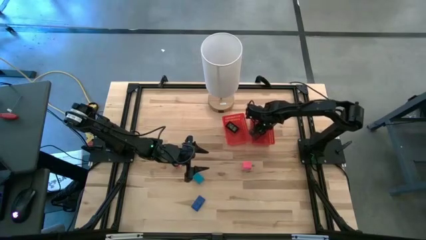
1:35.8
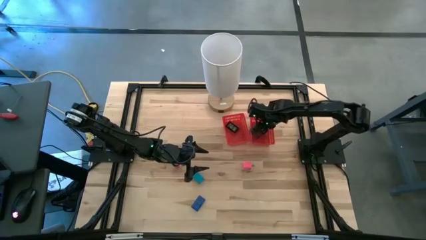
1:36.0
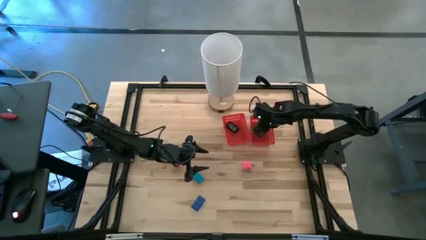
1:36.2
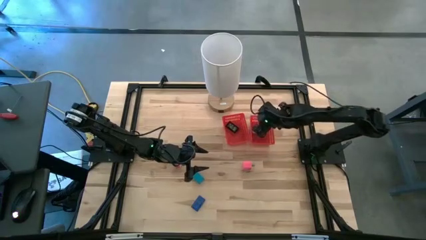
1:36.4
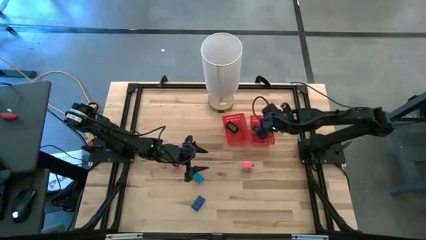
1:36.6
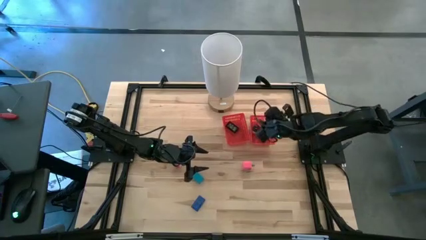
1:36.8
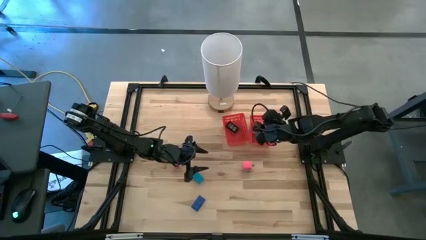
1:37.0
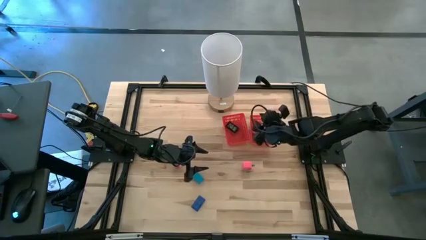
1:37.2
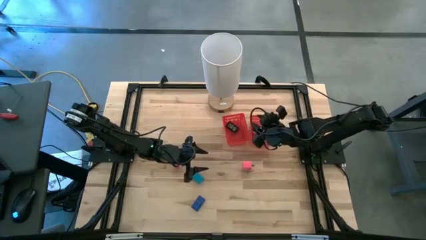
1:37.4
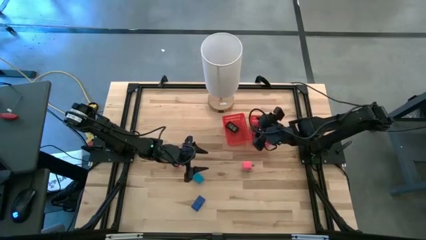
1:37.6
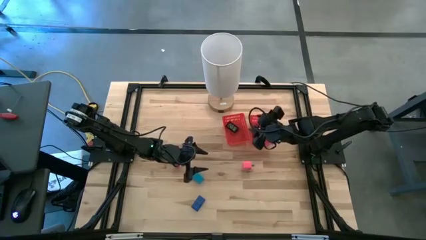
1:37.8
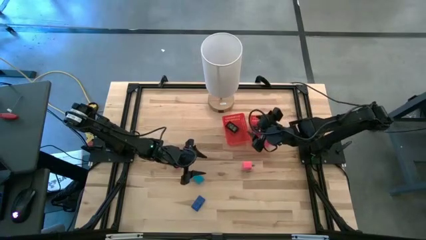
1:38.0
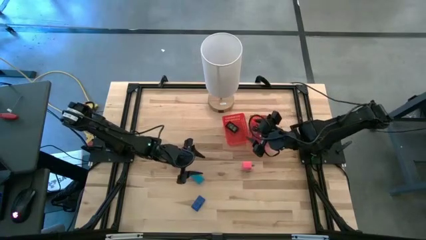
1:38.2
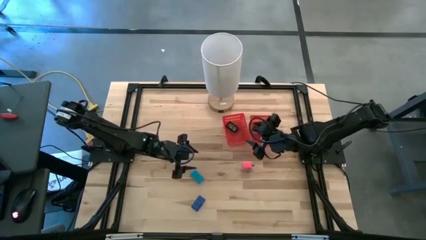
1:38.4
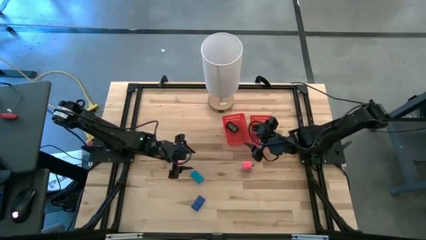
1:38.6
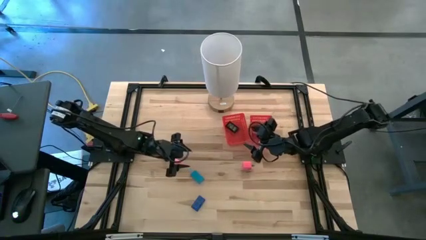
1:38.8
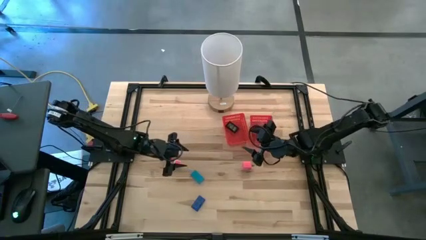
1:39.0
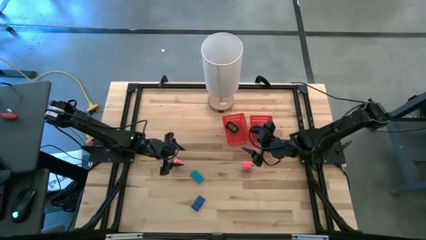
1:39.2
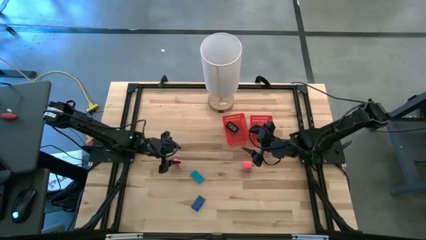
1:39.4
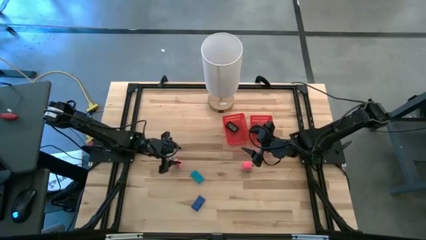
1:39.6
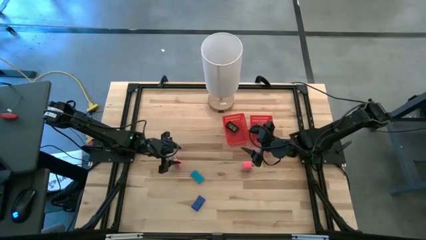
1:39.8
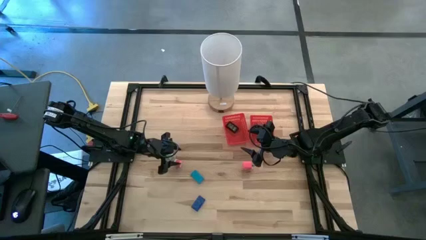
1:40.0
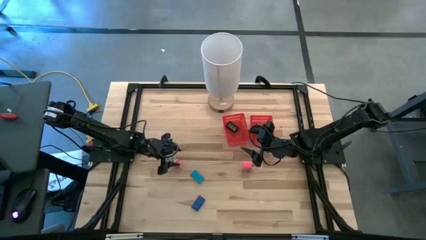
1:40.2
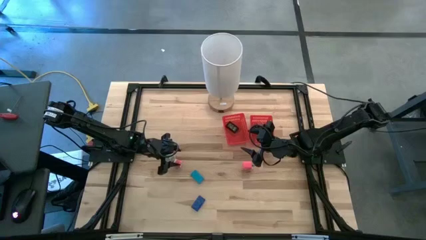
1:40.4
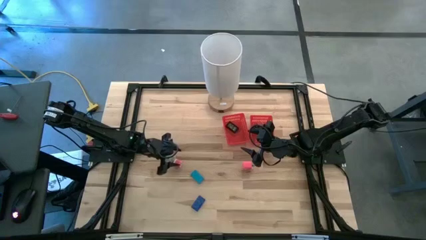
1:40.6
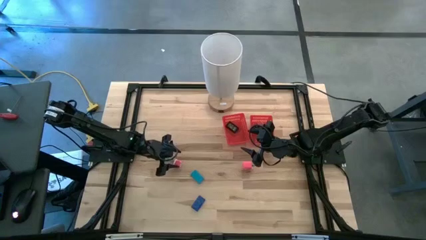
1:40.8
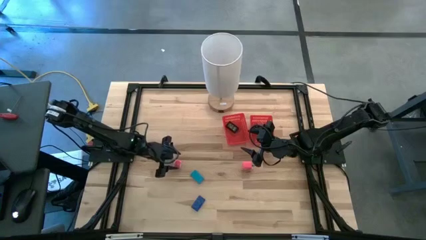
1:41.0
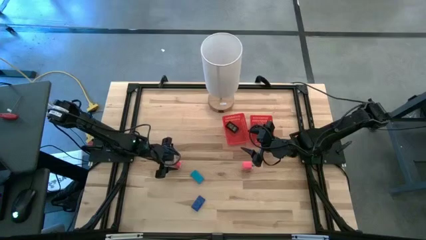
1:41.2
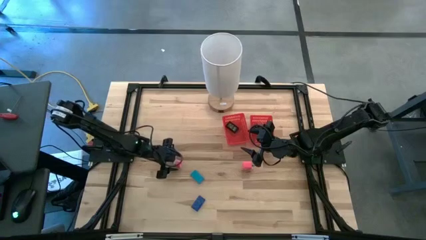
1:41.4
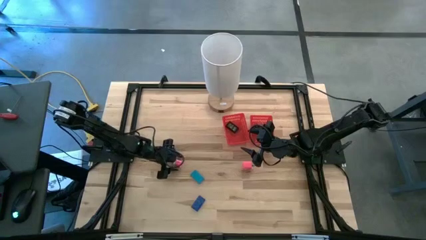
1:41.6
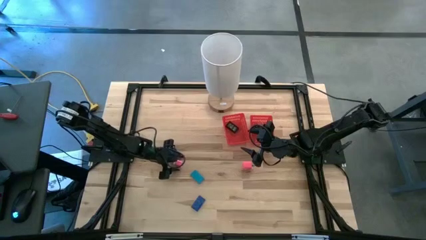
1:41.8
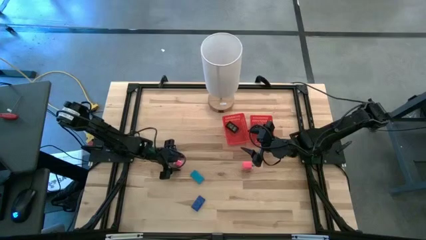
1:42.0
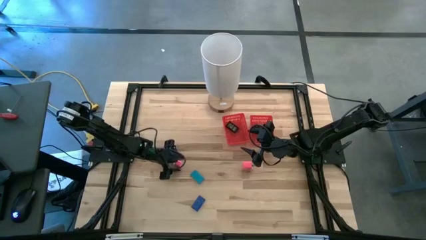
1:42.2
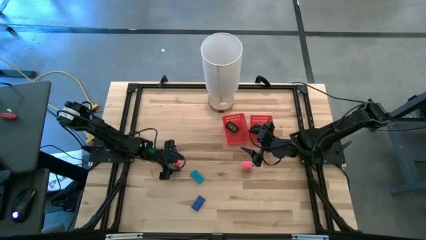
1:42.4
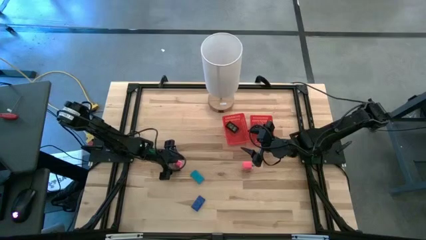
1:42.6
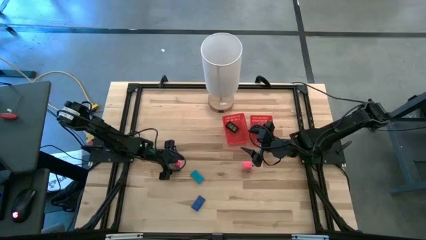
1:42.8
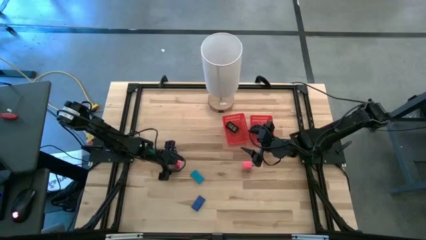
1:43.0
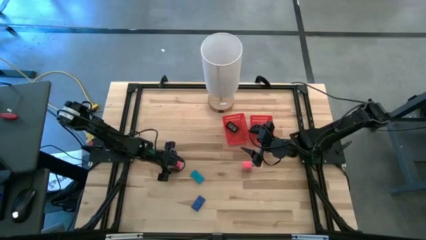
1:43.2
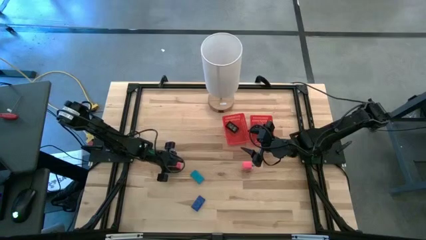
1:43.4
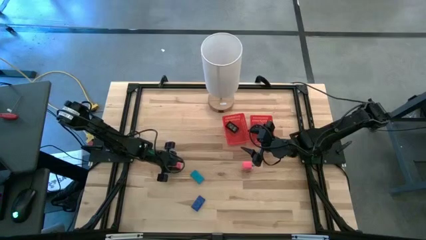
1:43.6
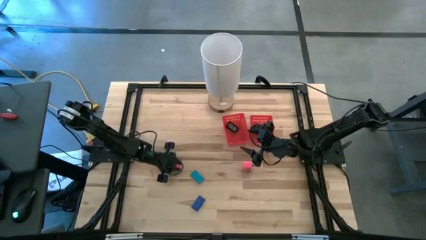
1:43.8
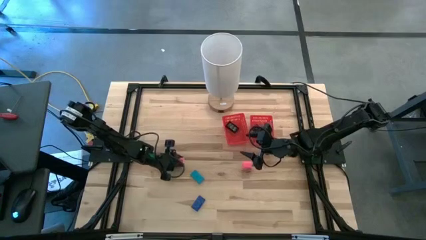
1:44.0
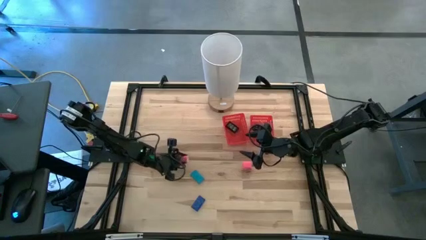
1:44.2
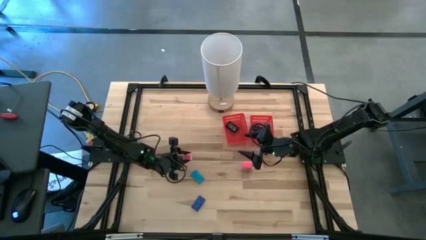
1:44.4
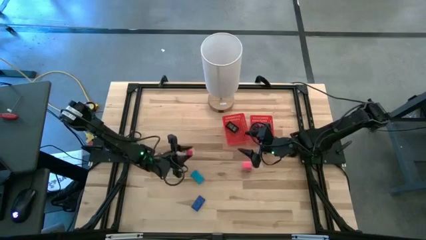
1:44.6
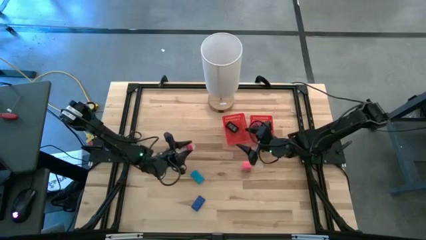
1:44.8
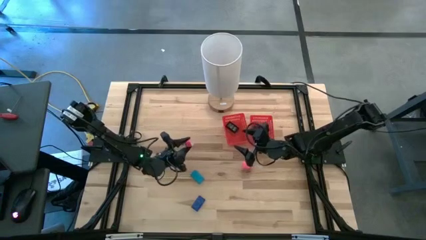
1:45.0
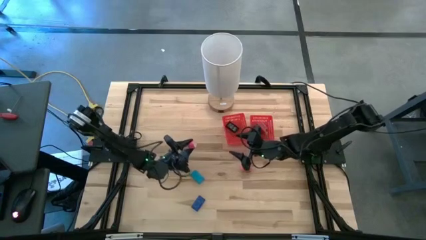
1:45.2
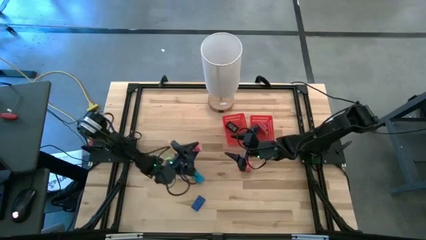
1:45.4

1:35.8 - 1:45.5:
Task: Pick & Place Office items
Put the pink white charger adapter into the right red bin

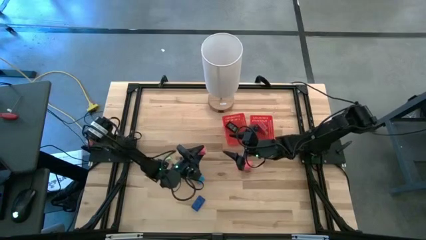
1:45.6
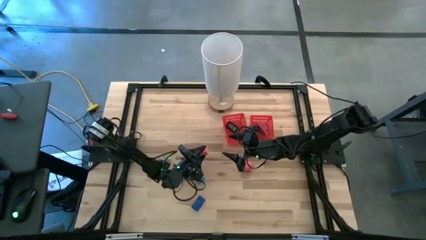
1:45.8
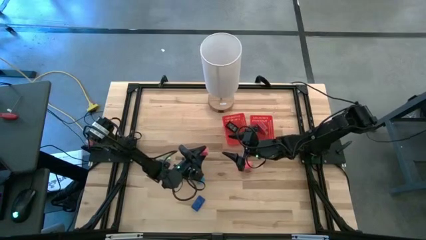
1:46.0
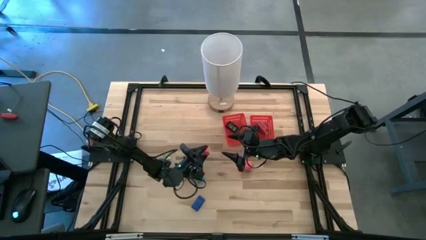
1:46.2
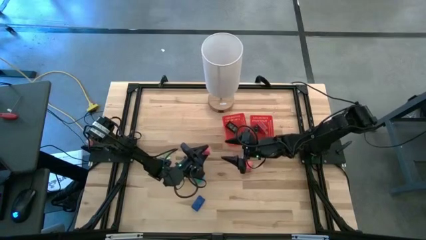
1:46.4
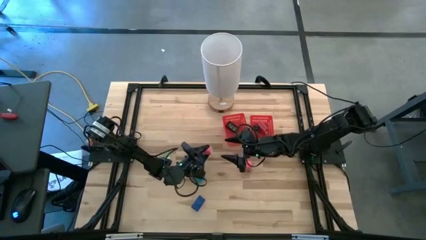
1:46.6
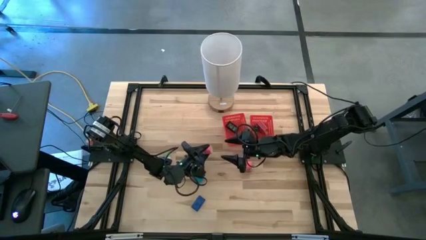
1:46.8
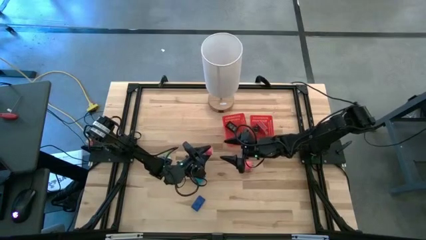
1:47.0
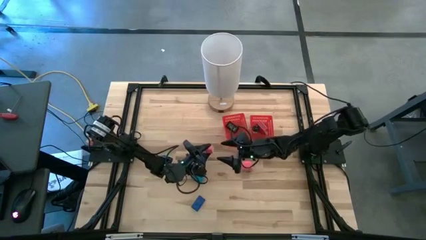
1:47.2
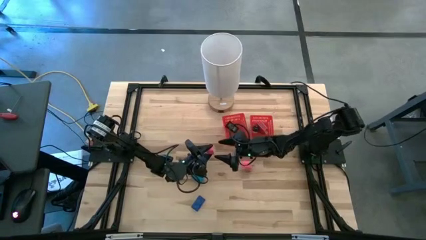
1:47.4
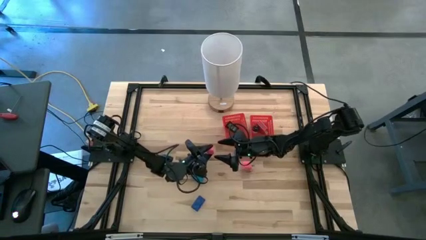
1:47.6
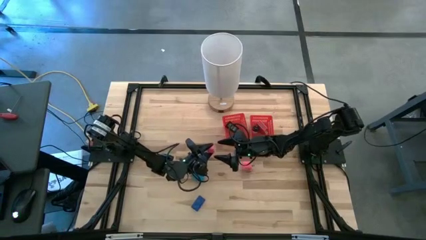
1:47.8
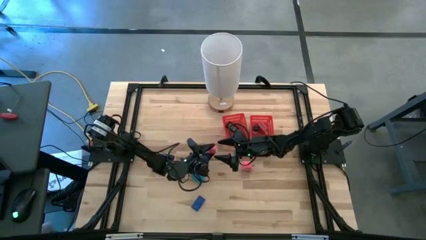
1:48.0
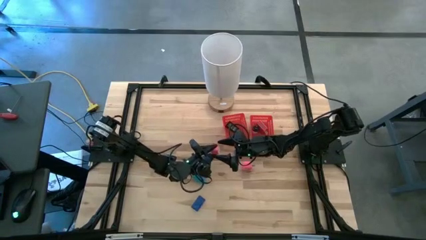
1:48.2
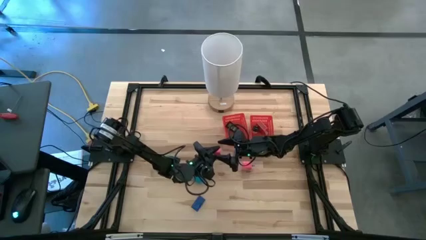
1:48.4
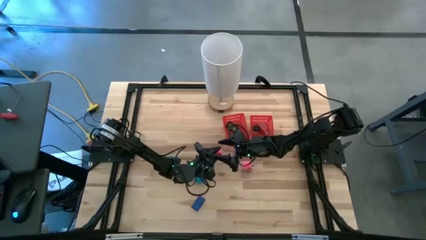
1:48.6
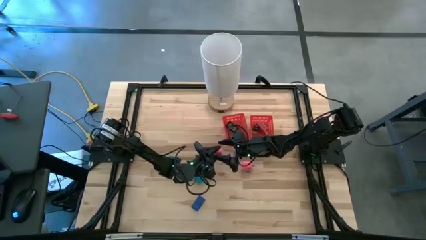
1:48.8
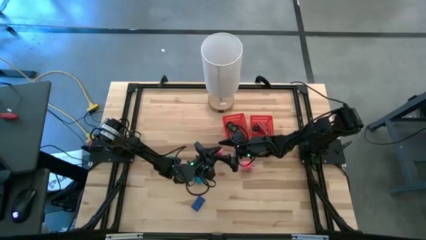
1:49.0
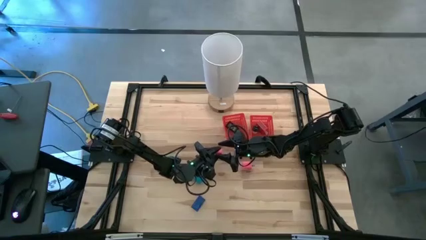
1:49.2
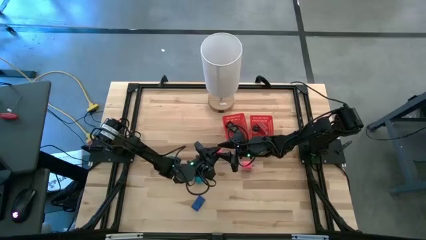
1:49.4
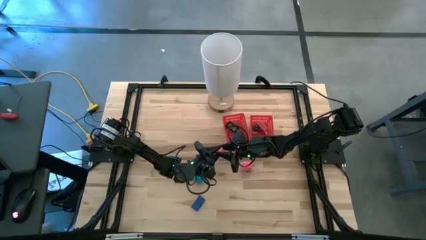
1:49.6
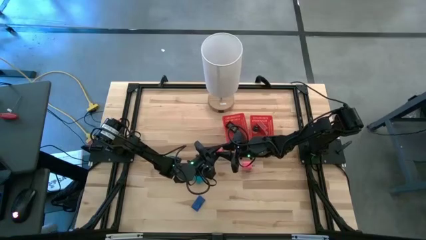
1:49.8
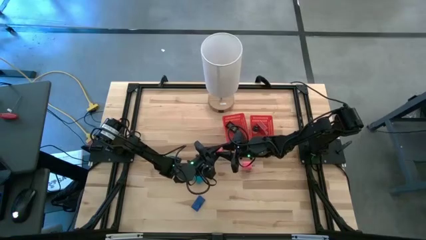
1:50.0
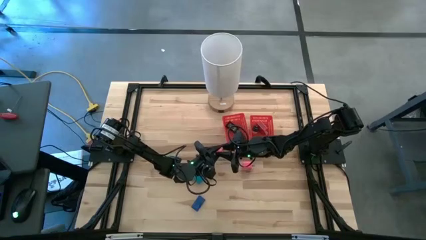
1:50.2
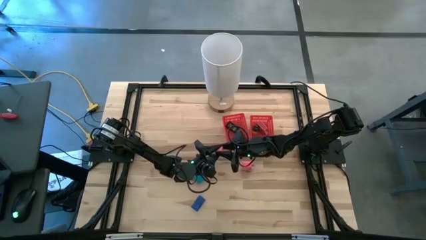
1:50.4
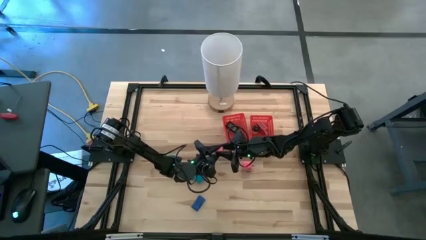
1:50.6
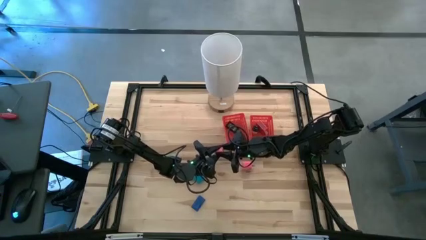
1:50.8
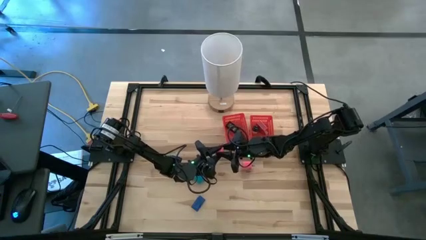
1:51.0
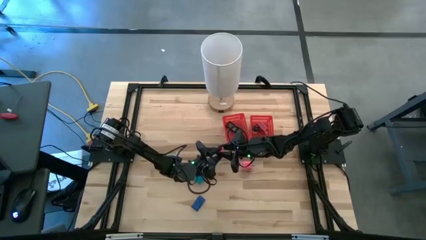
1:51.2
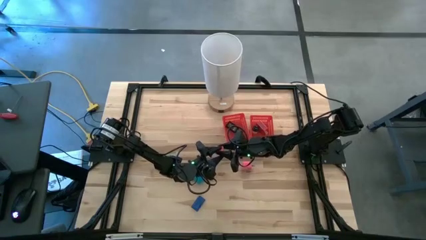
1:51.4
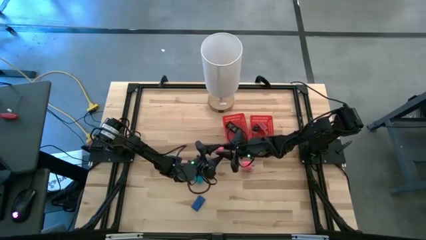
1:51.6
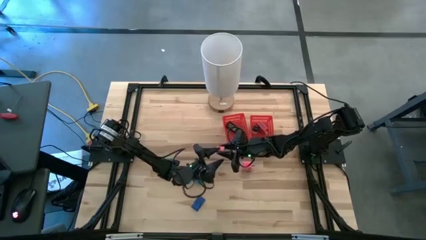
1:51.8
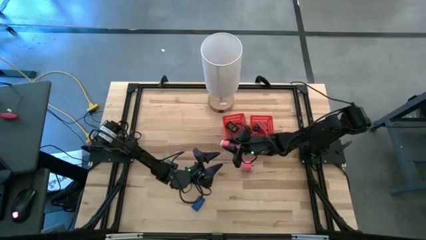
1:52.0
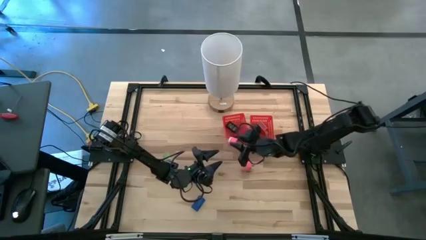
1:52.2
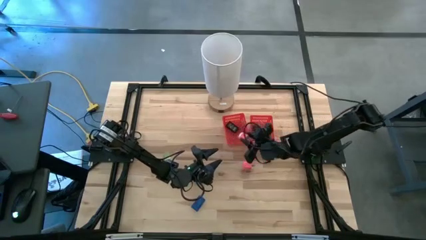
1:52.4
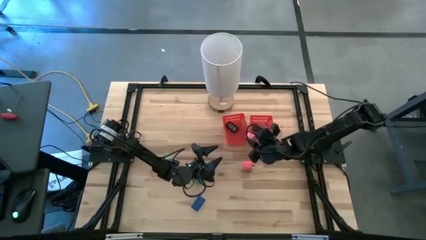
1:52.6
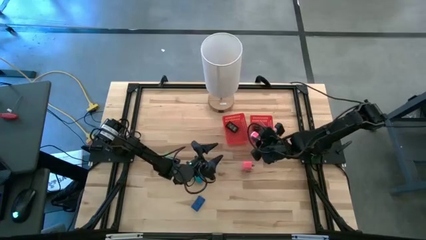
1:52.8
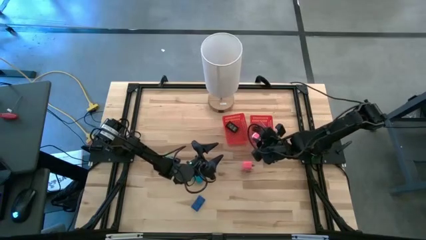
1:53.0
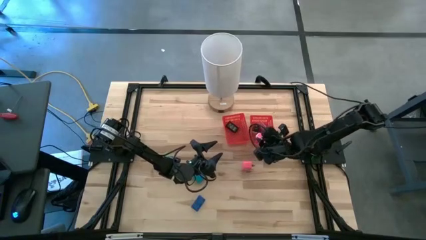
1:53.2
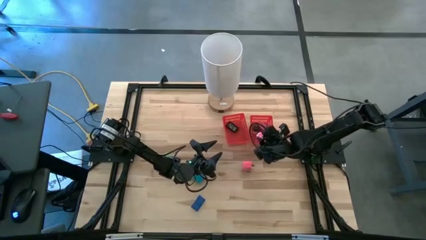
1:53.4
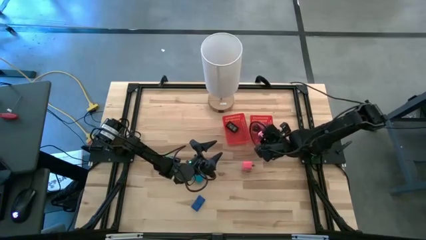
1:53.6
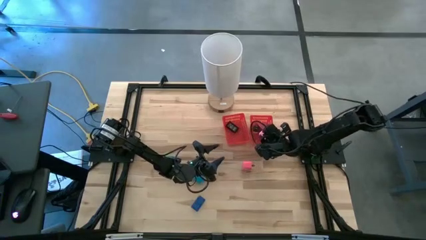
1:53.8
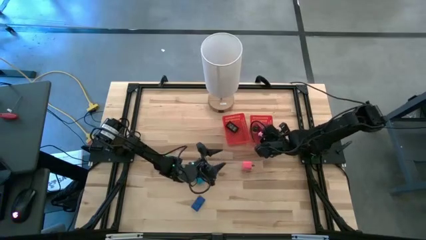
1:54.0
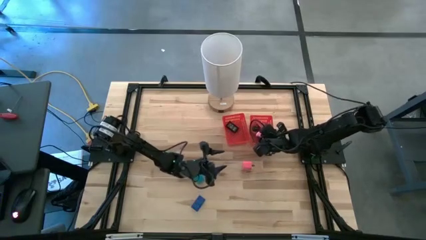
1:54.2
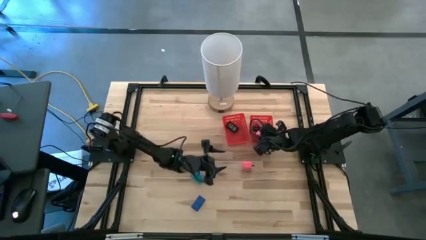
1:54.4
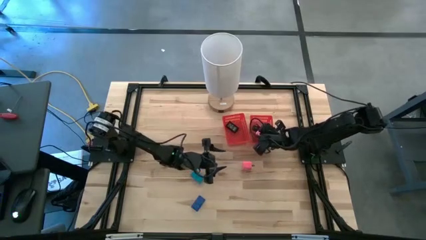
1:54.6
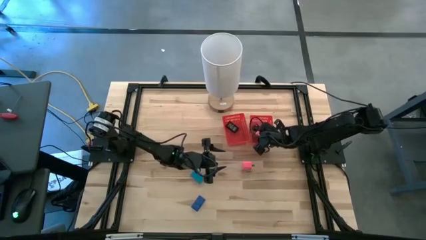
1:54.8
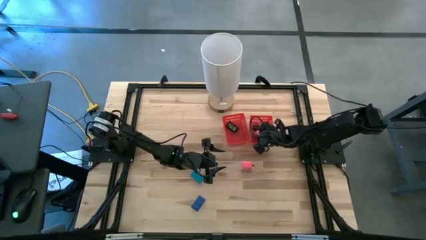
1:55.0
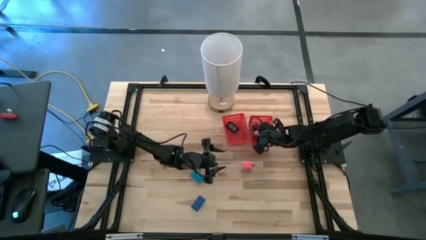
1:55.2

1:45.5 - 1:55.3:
Put the pink white charger adapter into the right red bin
